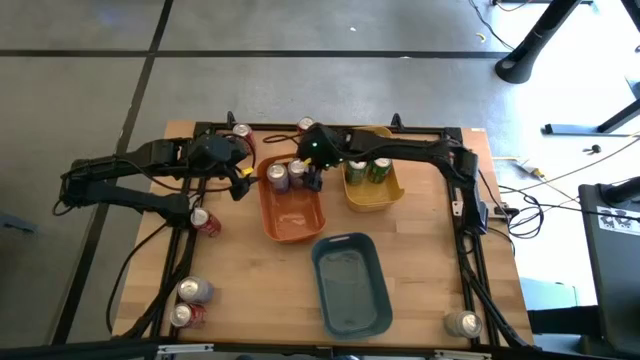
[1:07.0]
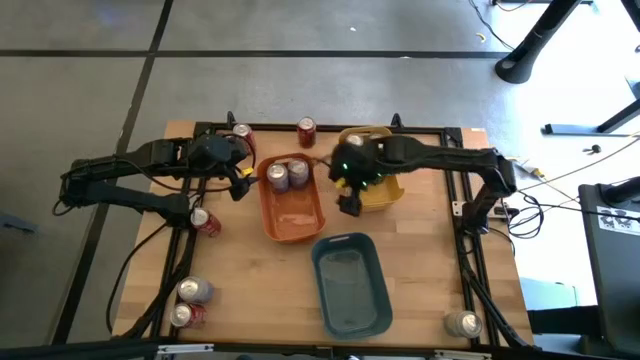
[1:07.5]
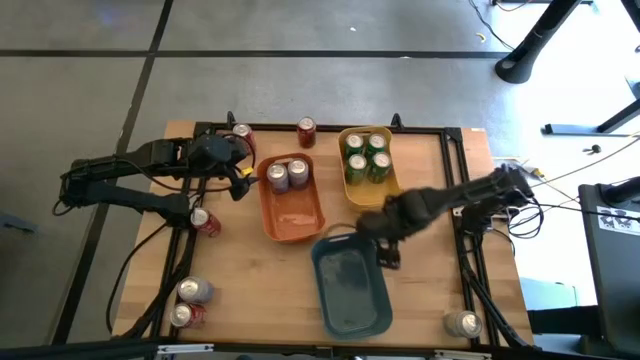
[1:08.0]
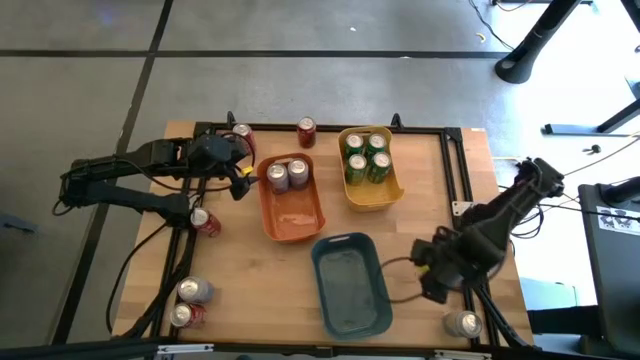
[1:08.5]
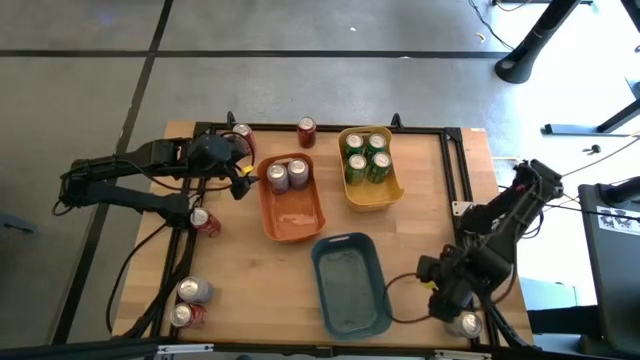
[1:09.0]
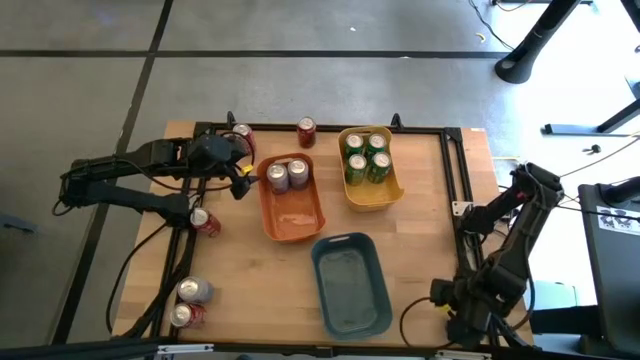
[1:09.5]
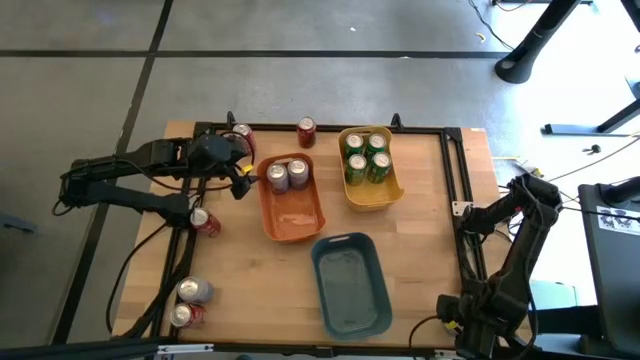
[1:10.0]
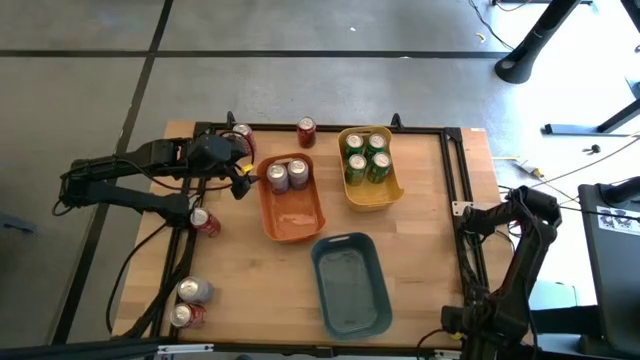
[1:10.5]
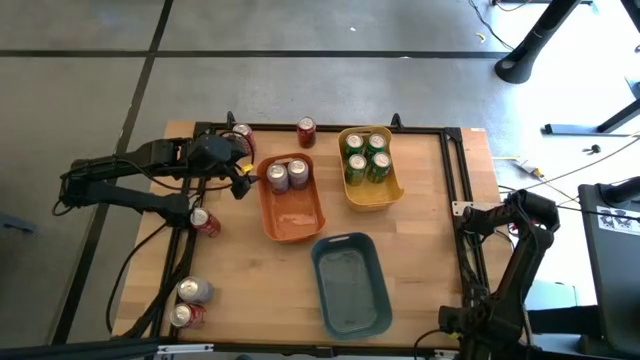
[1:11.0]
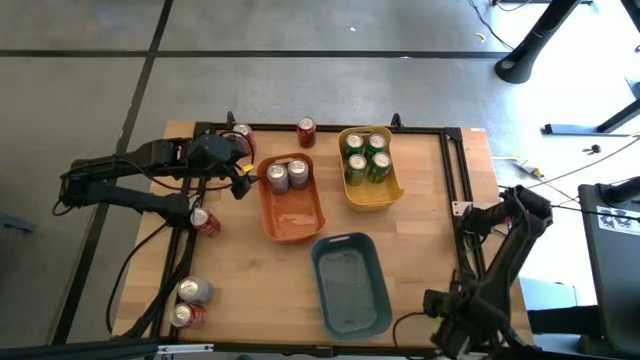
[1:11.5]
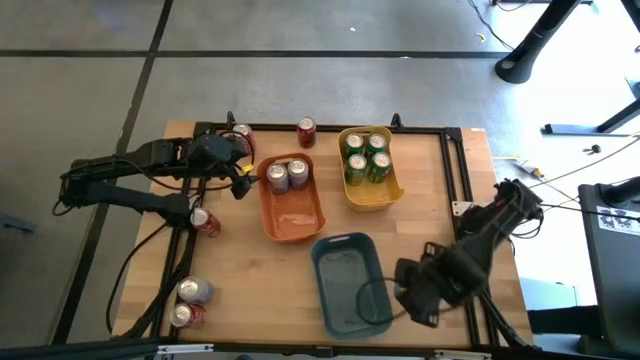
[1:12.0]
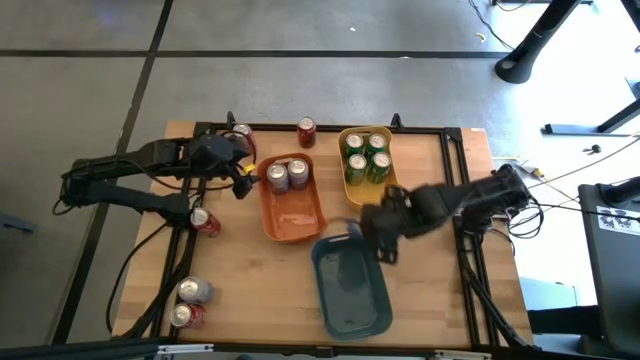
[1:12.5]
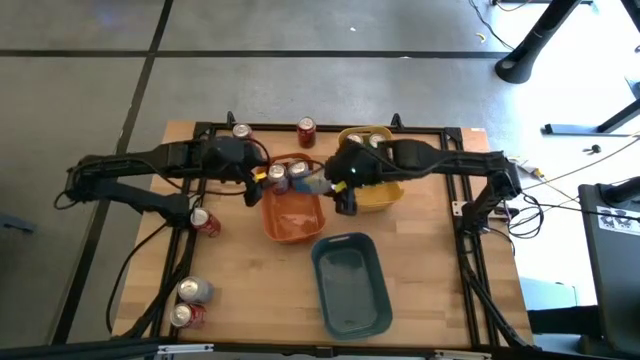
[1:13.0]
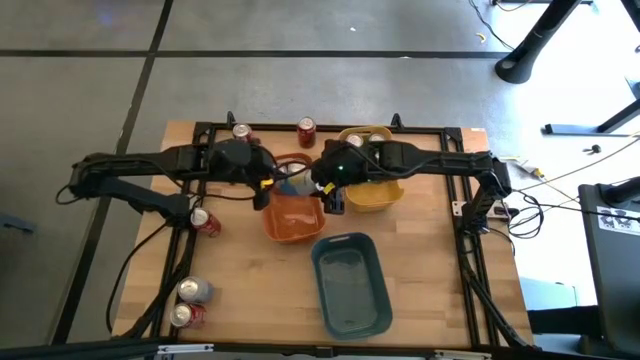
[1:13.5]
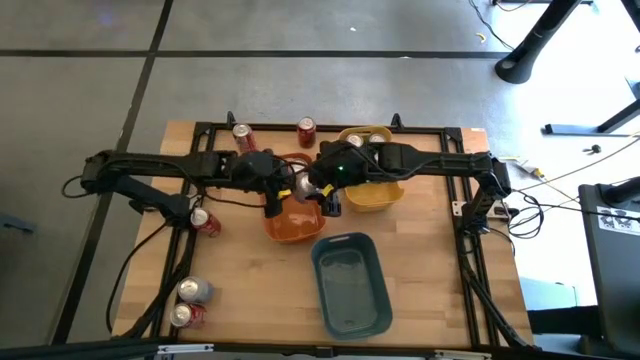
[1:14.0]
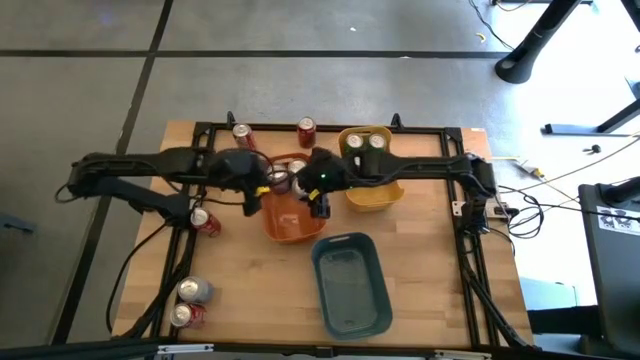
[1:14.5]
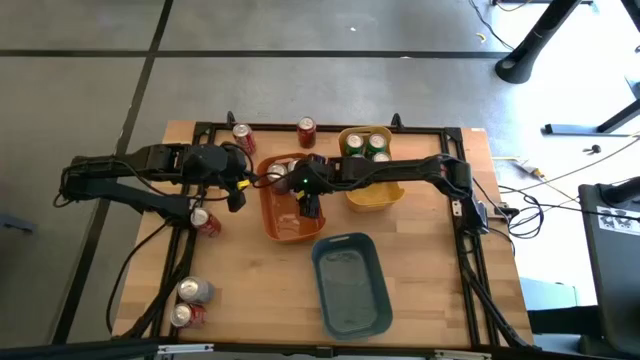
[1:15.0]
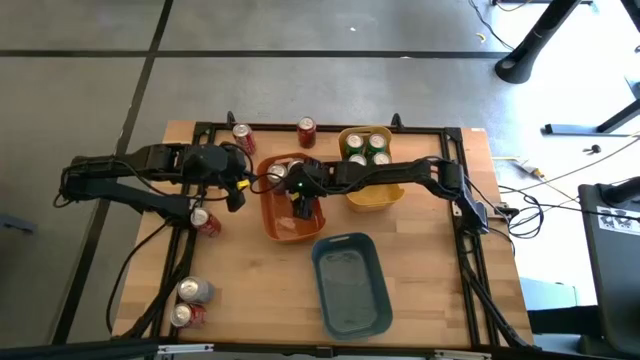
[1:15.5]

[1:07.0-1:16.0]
Task: Sort soda cans
Put the white soda can into the orange bin

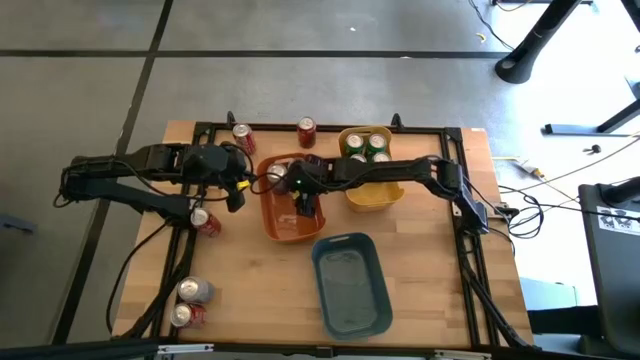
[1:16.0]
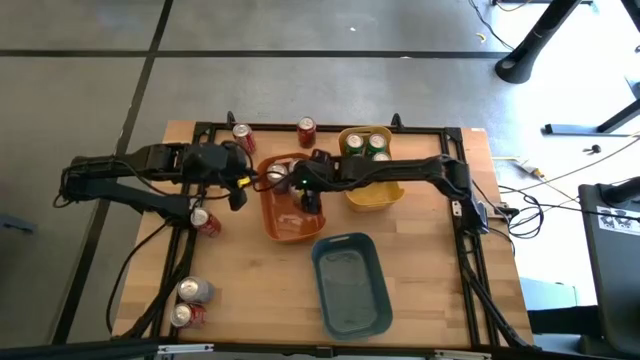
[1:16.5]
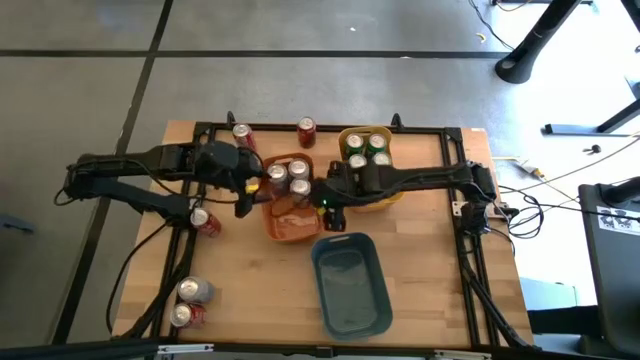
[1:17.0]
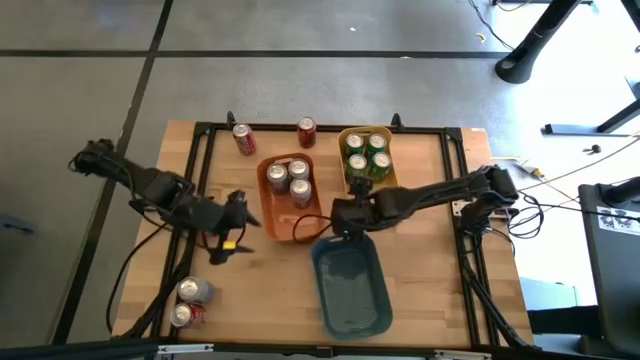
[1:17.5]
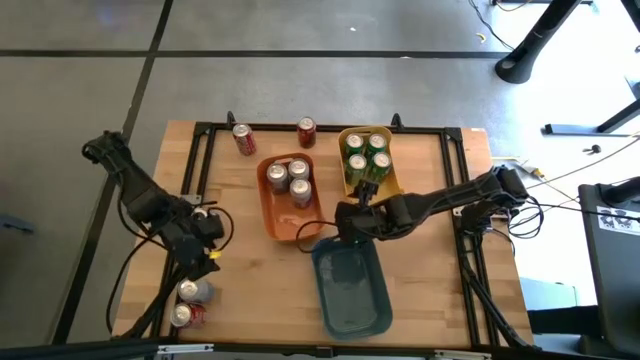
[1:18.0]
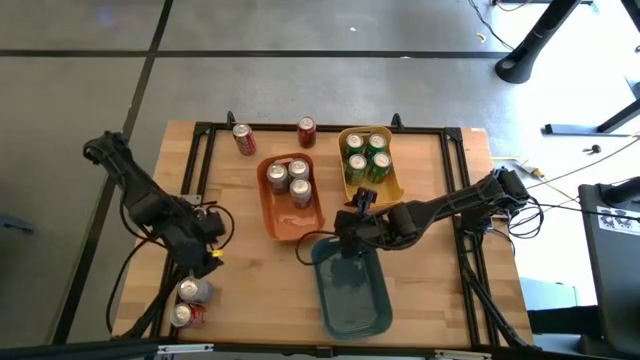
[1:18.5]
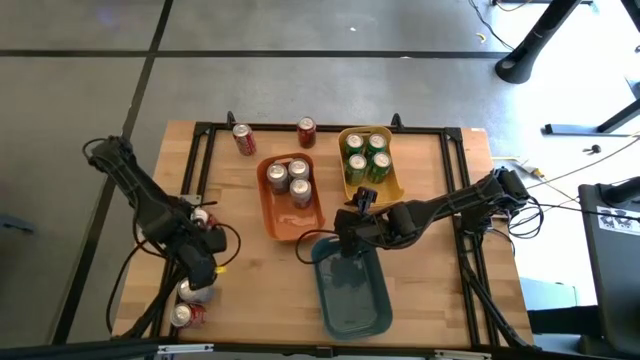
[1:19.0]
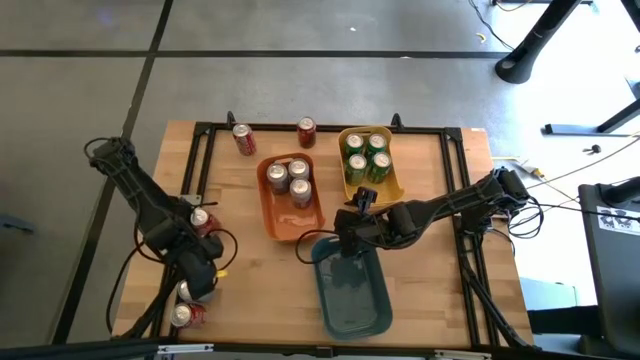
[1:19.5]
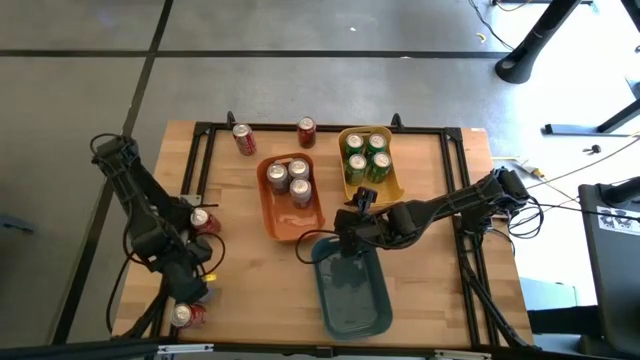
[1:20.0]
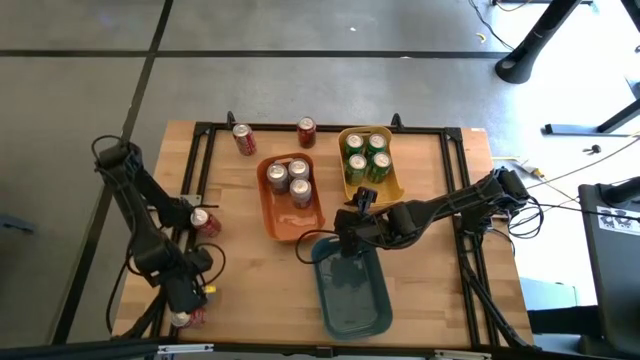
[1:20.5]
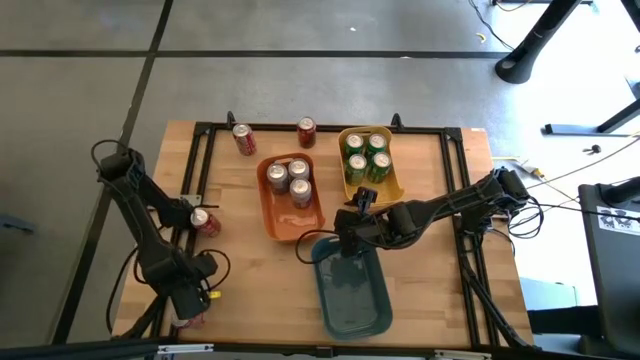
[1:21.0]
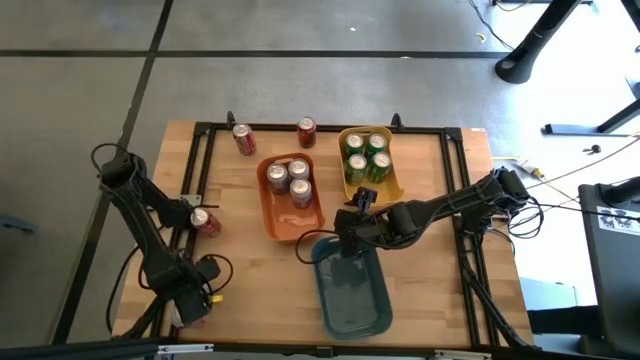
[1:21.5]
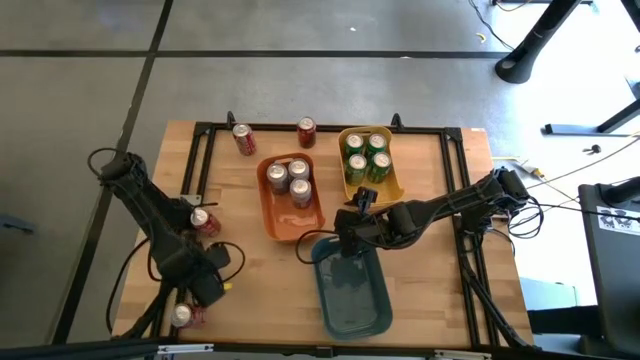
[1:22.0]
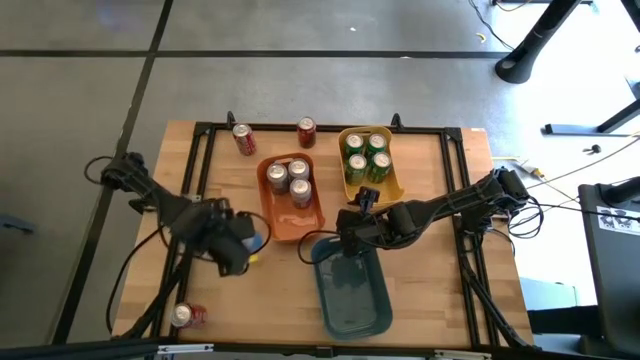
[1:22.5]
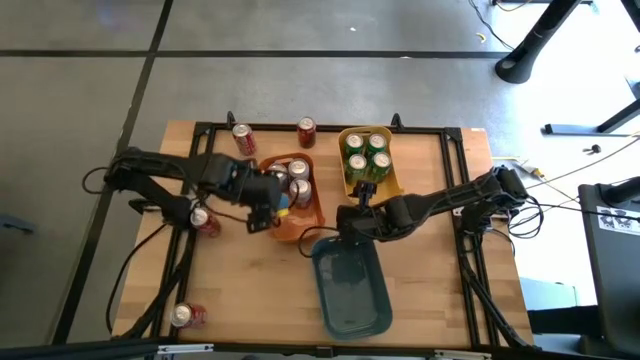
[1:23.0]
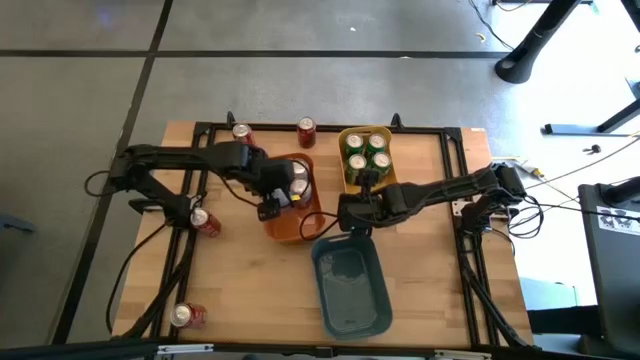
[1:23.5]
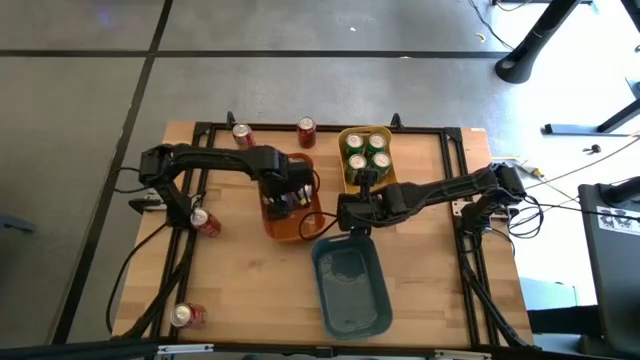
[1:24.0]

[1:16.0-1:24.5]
Put the white soda can into the orange bin

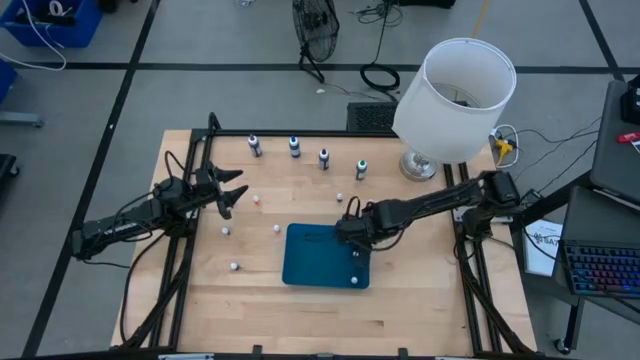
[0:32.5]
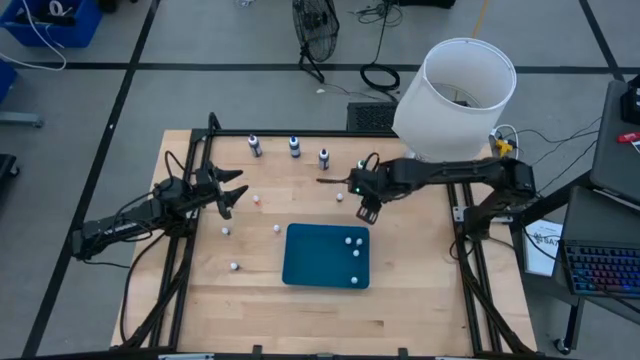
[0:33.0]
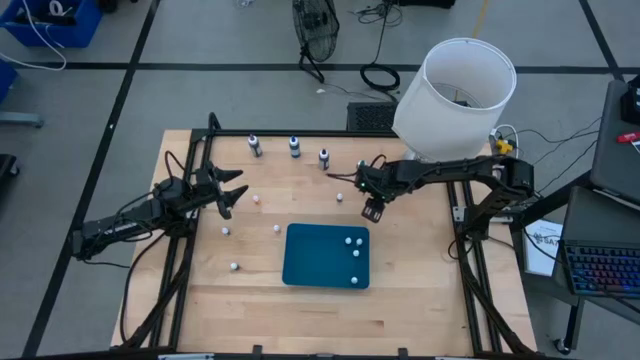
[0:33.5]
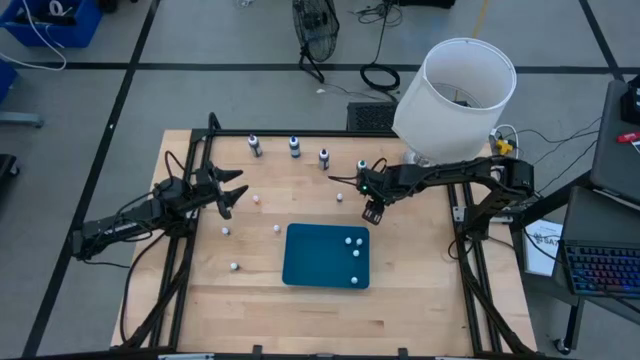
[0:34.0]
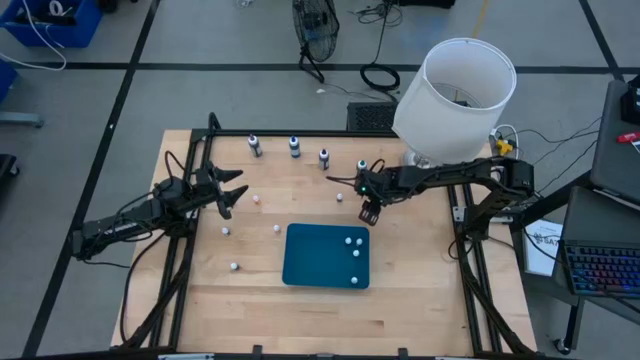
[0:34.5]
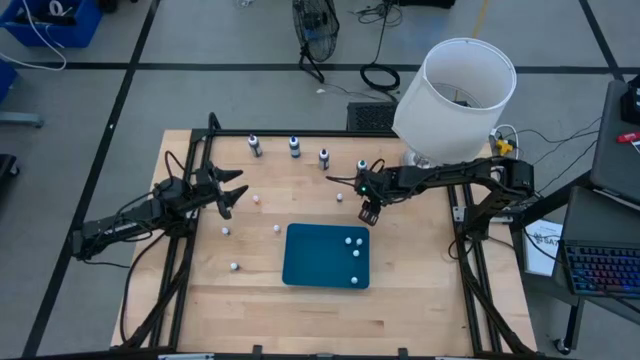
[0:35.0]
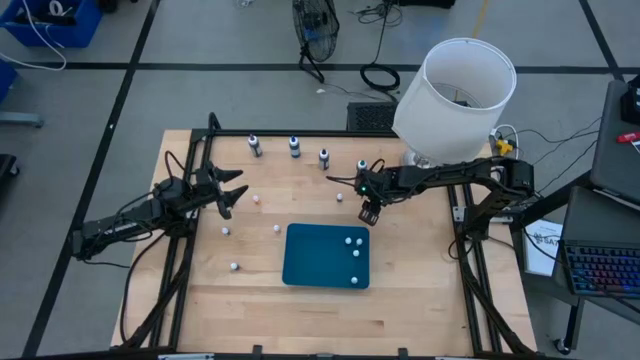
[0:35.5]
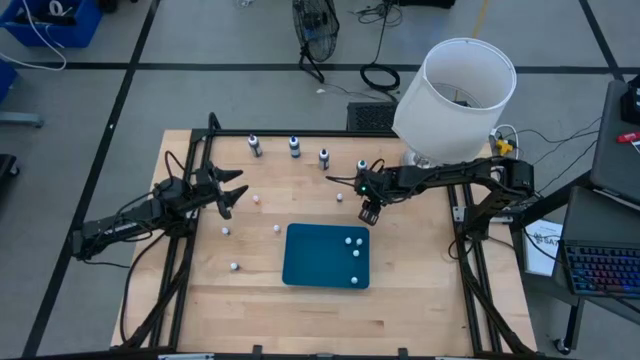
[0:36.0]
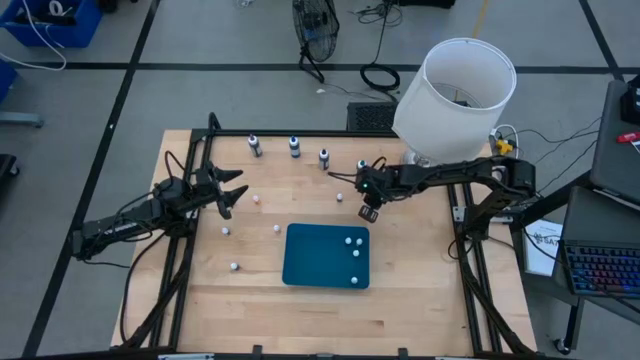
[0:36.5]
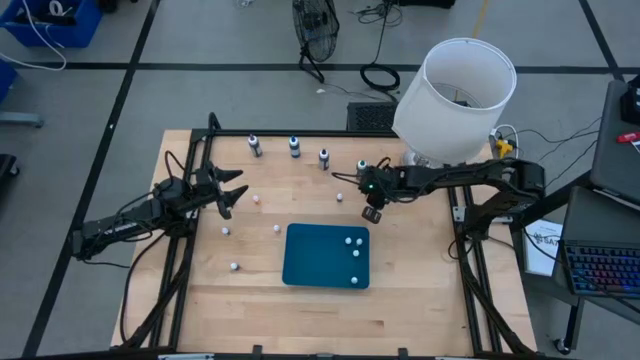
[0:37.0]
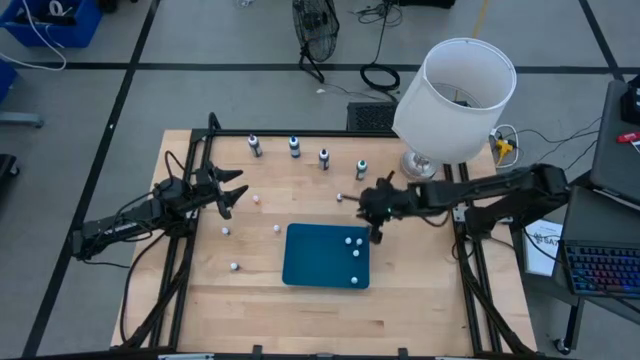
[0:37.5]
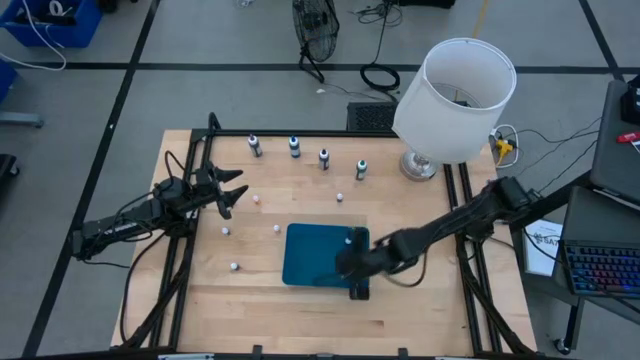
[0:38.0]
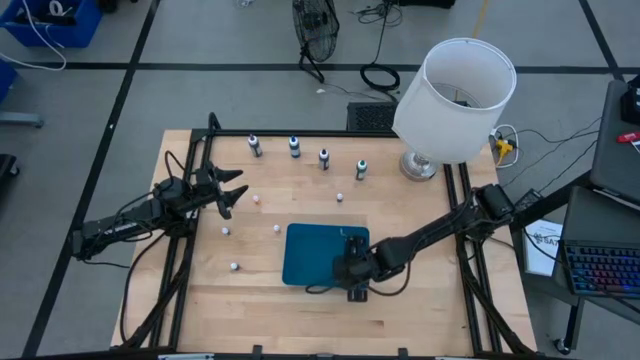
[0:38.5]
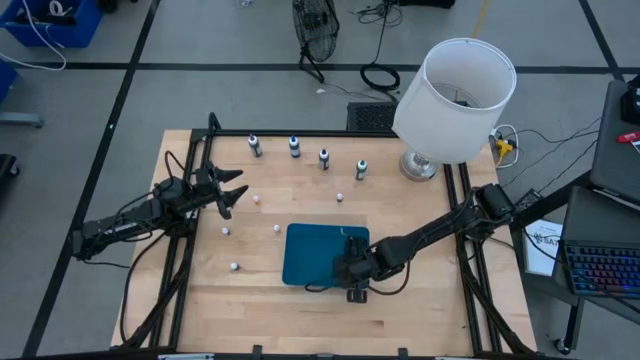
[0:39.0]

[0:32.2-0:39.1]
Task: Pick & Place food coloring
Put the top right small orange food coloring bottle into the blue bin
